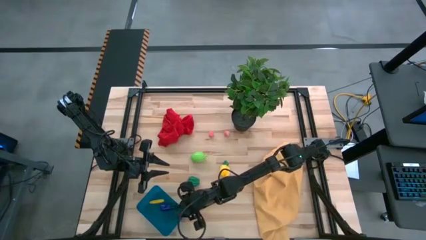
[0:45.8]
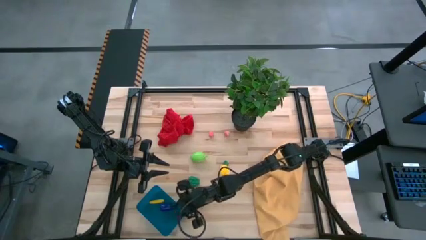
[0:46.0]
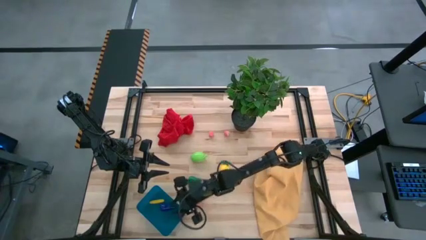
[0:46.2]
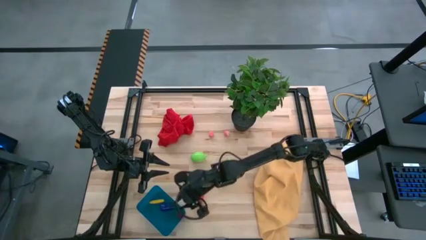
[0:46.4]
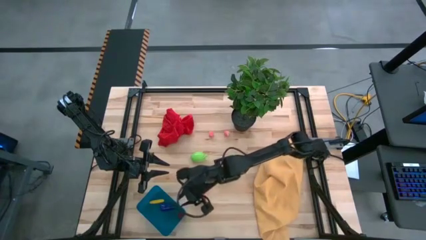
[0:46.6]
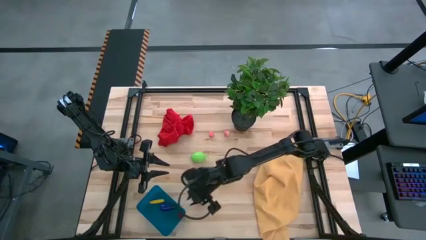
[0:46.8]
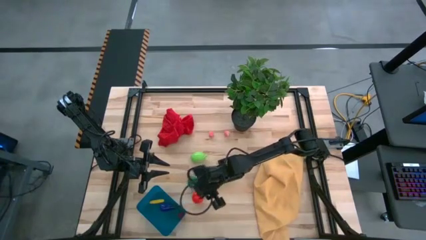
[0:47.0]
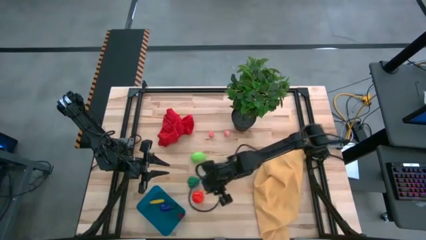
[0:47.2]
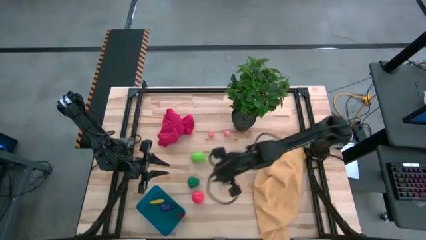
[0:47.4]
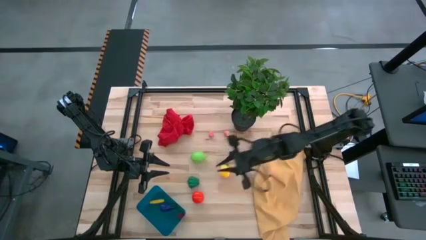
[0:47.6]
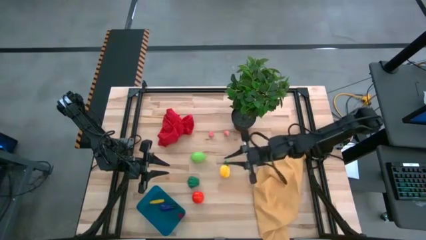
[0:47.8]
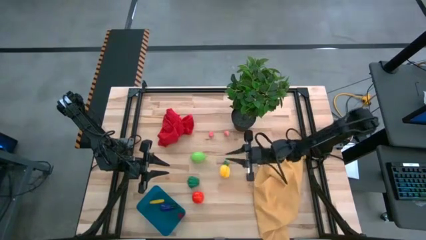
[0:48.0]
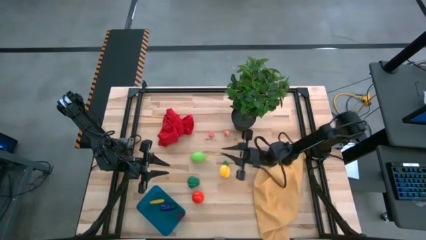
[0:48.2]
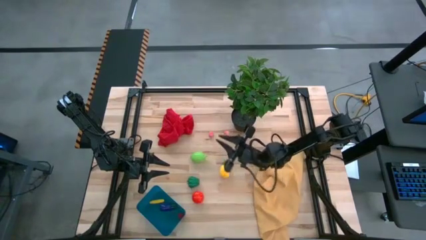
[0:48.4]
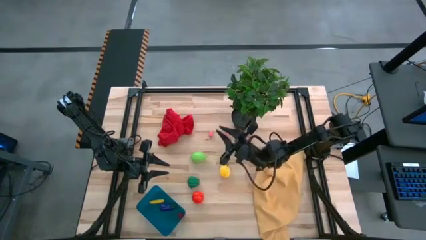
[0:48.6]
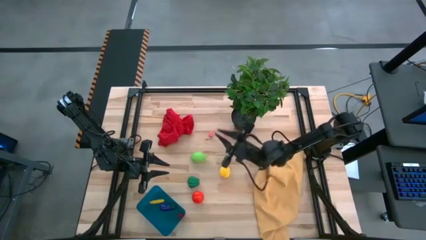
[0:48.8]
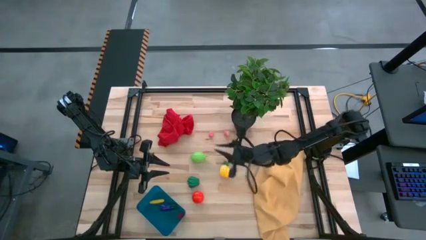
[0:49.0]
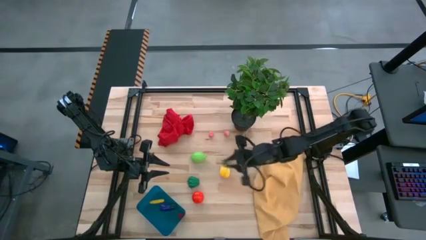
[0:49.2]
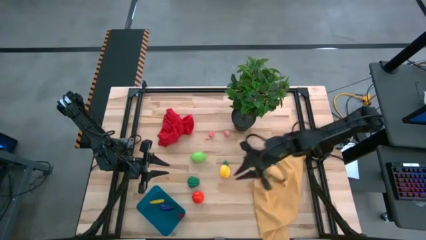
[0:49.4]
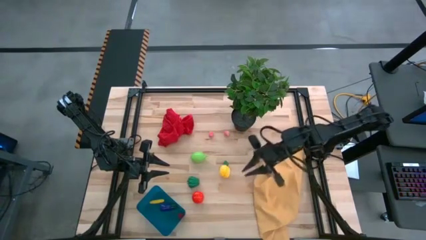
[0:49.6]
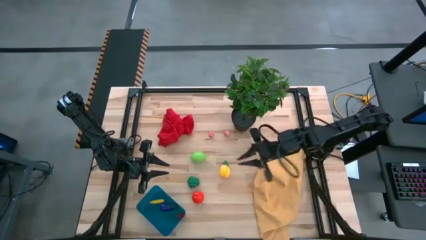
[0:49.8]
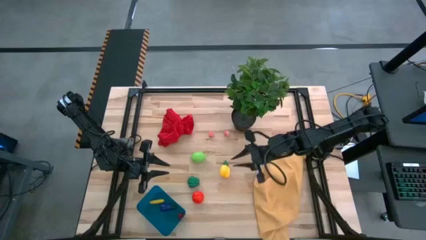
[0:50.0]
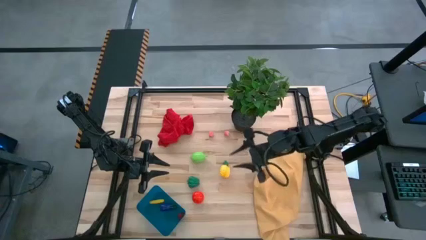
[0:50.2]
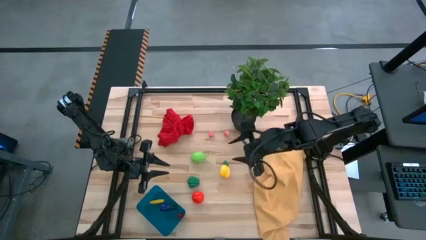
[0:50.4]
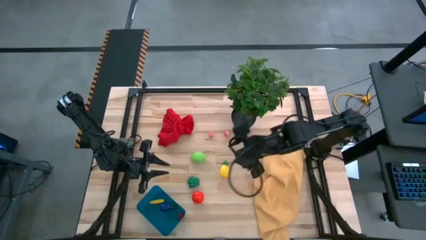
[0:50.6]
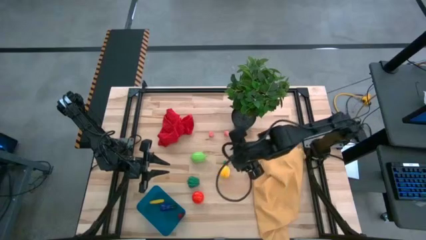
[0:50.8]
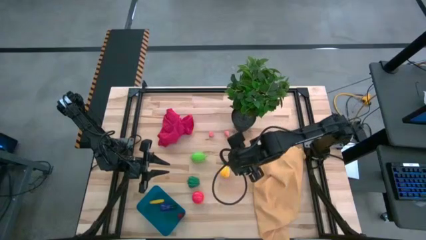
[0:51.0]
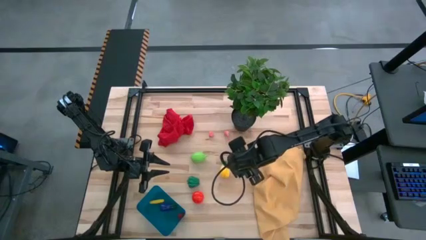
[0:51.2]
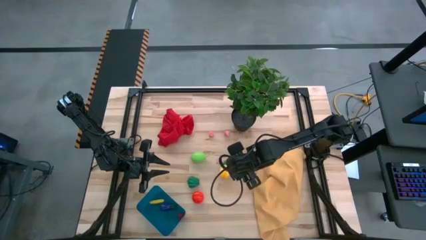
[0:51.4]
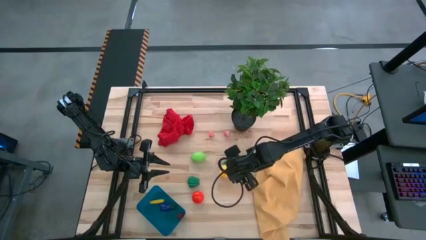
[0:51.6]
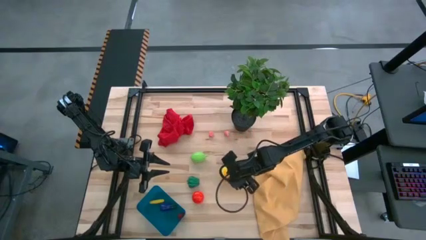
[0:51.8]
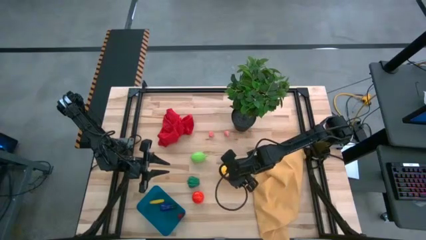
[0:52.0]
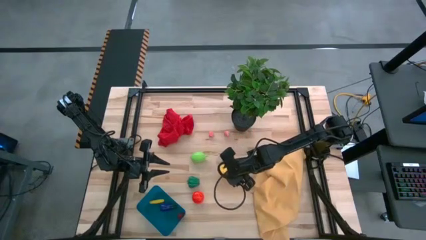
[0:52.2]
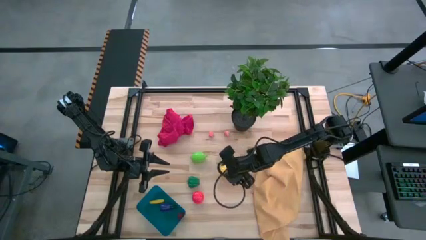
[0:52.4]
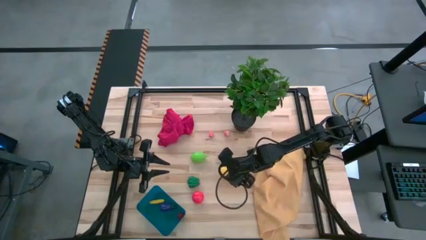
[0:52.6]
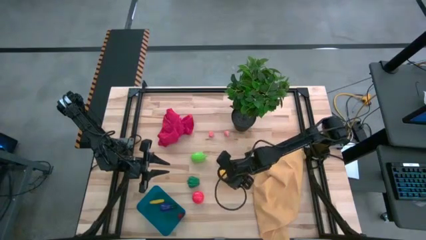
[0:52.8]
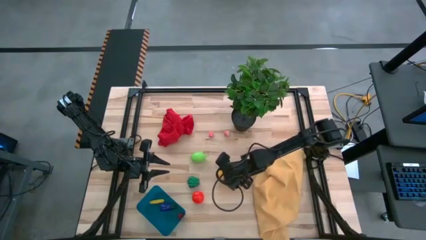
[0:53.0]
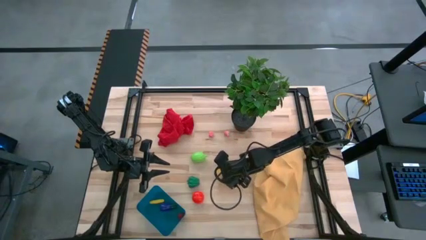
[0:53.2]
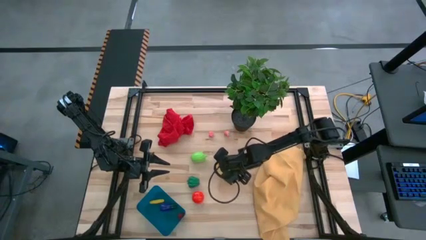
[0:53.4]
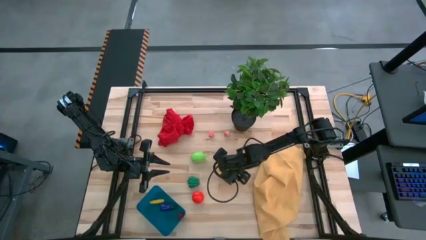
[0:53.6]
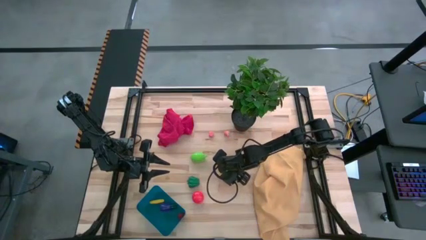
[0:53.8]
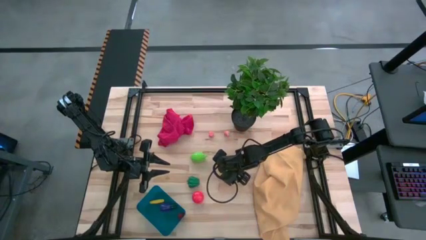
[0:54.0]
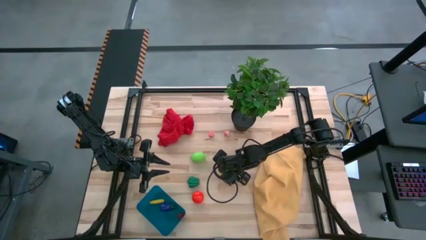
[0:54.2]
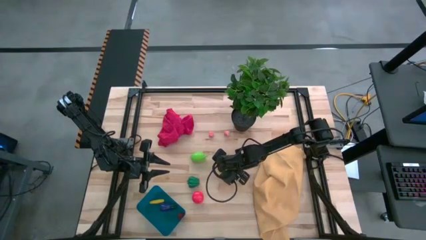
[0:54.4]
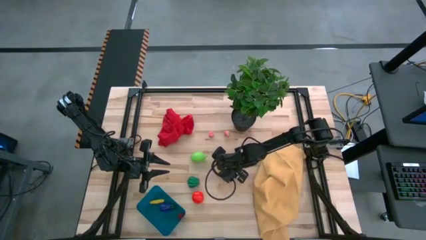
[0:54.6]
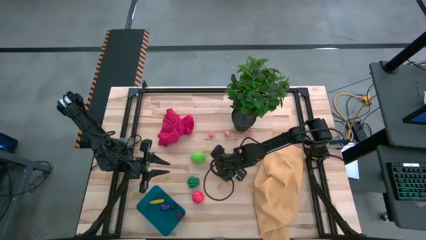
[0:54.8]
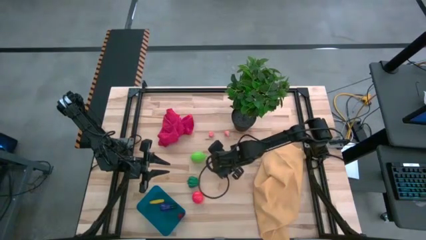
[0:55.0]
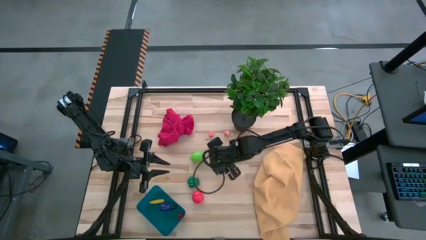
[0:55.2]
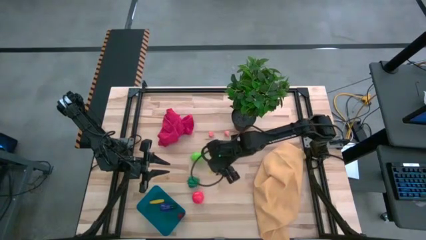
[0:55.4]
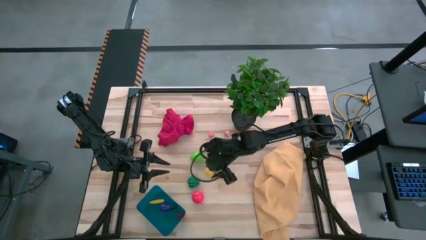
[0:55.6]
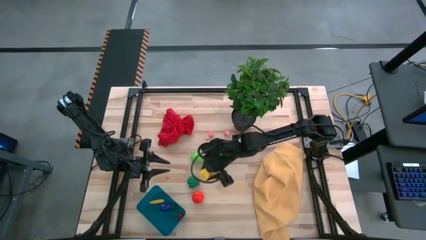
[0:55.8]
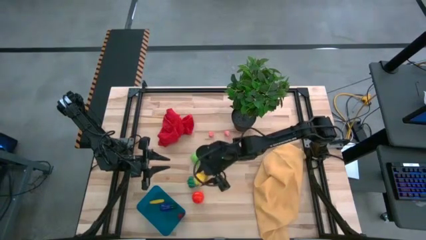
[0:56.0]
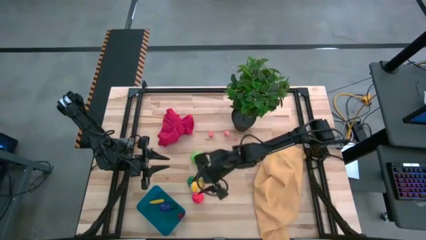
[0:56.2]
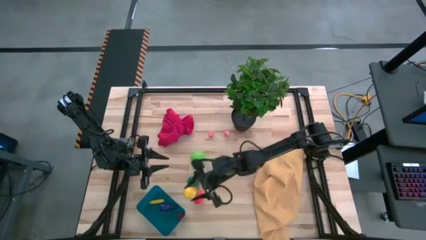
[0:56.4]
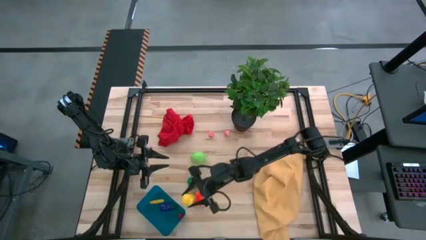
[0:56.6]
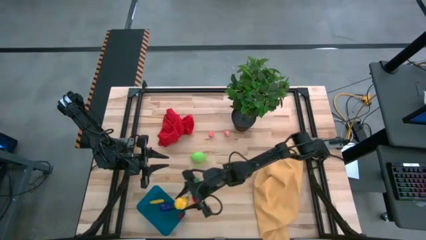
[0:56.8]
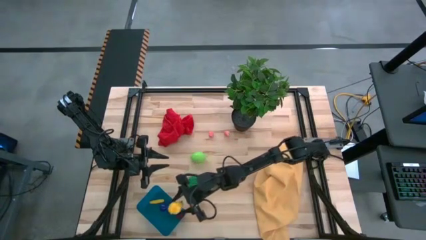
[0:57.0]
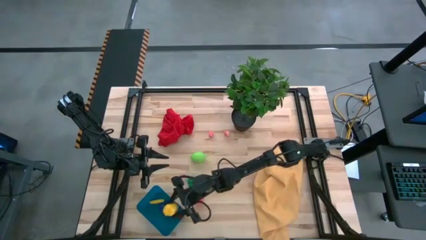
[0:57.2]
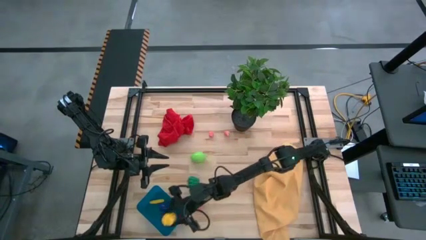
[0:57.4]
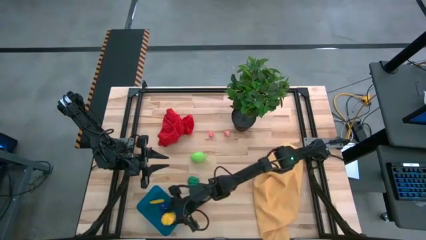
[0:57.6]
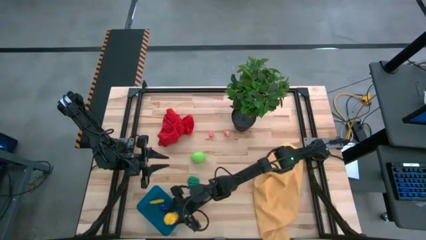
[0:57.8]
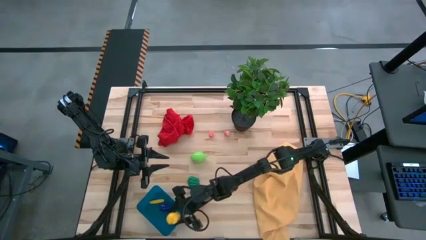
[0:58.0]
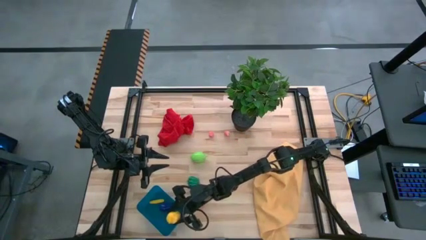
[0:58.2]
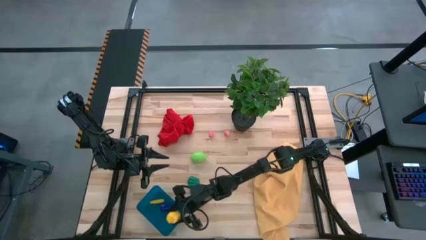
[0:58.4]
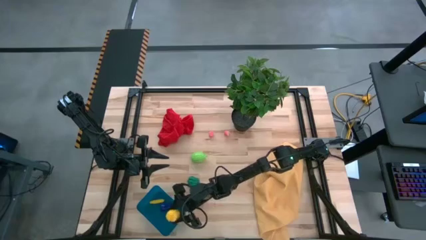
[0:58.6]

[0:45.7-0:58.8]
Task: Pick and placing Produce into tupperware
Put the yellow pineapple into the blue bin

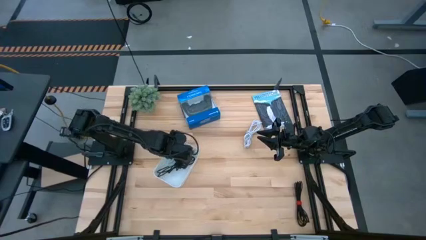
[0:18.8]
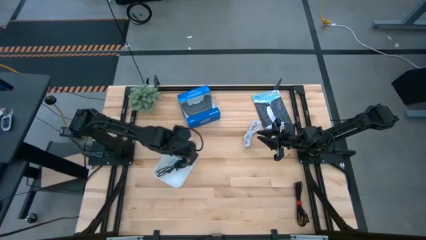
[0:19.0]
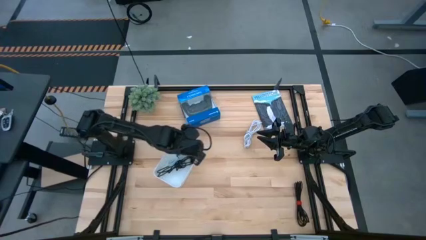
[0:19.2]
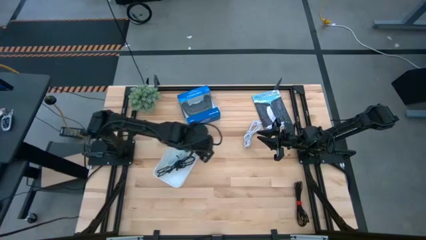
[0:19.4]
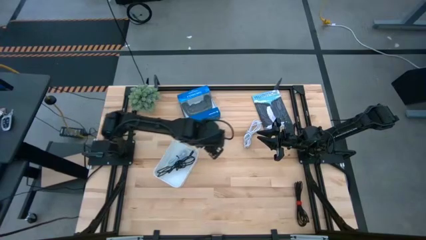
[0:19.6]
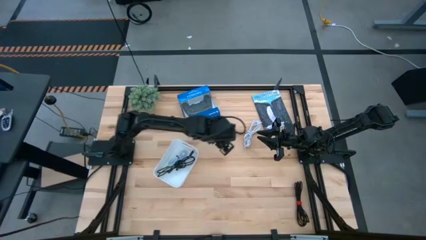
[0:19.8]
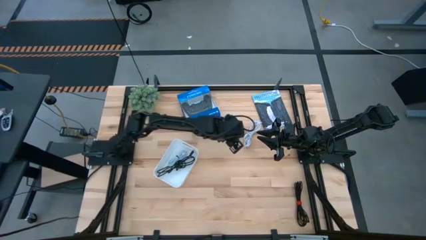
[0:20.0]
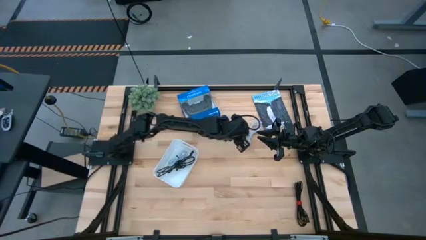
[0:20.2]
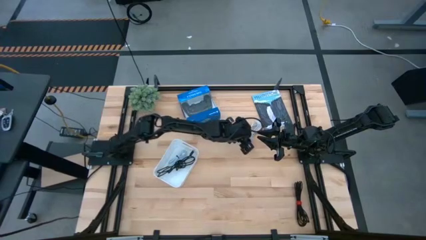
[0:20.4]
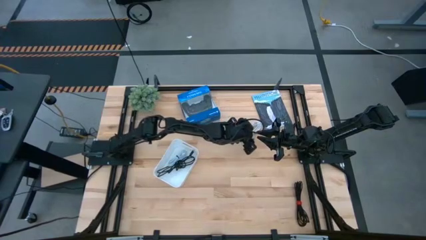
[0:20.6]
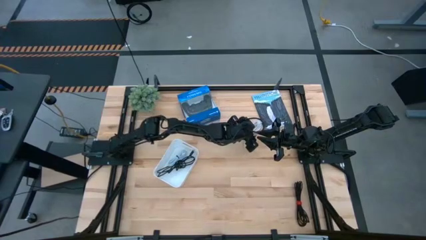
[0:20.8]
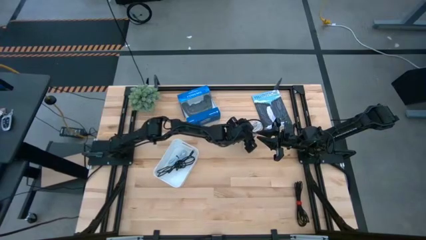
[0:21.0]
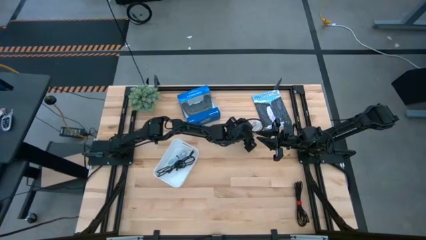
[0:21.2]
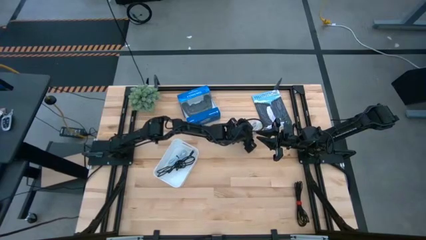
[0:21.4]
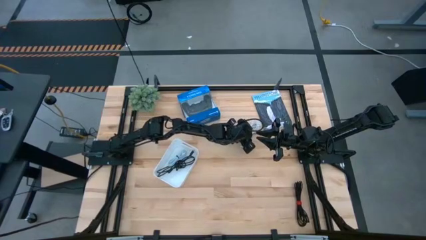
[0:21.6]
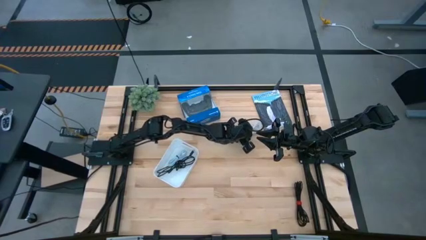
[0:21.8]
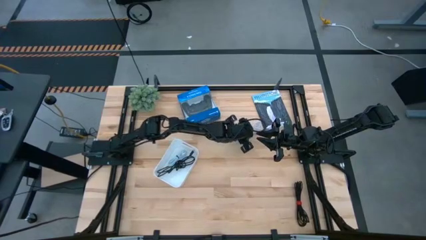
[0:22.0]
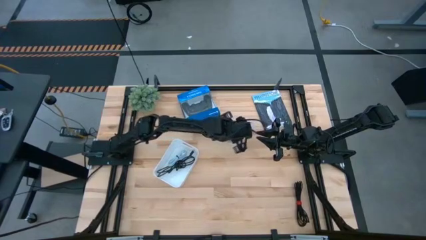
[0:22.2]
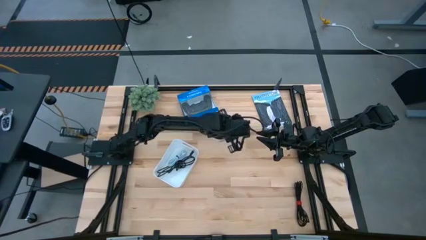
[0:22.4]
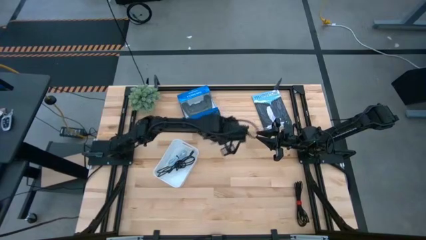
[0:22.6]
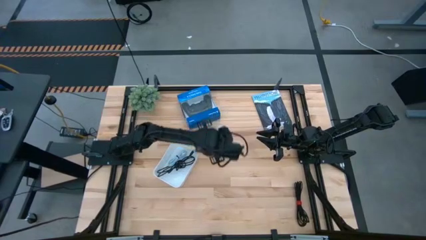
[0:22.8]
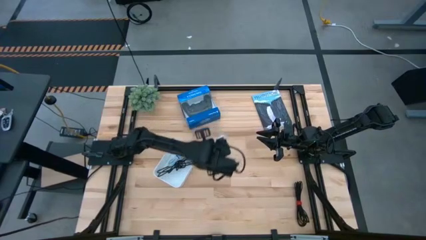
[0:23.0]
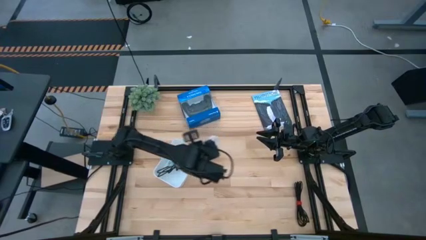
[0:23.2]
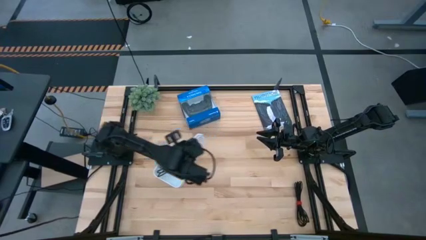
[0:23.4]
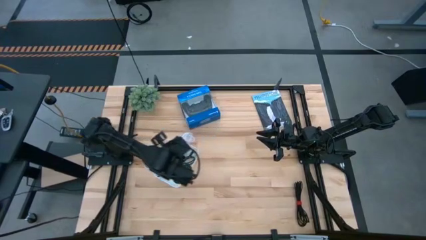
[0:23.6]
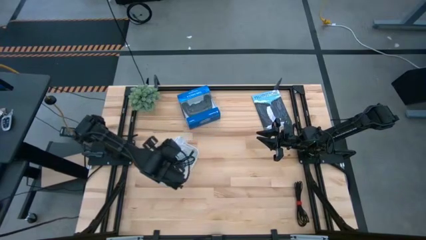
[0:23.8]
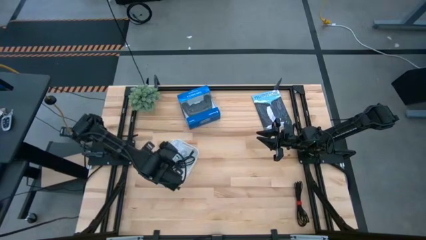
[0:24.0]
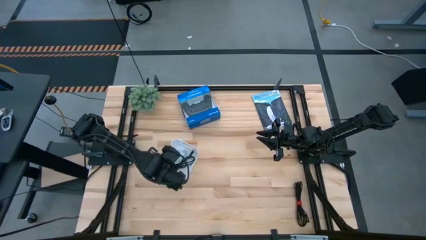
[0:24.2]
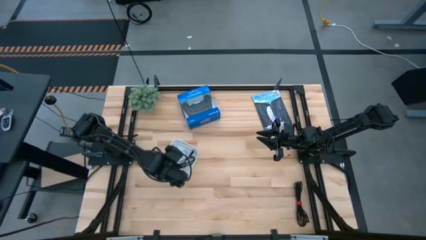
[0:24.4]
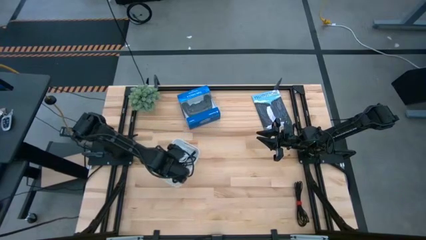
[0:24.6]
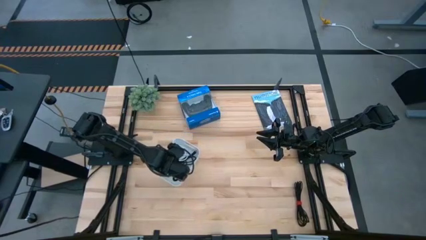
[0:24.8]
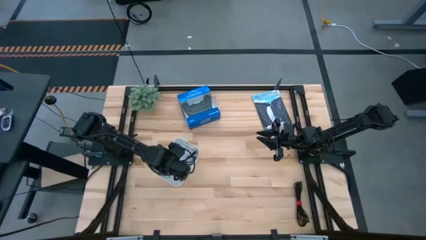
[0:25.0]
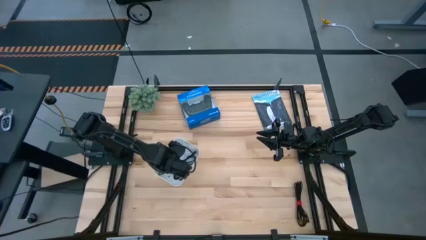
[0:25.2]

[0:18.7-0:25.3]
Task: Pick and place USB-C Cables
Put the white charger cable into the white bin
